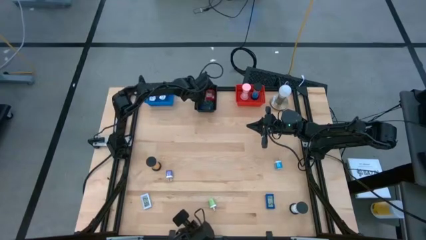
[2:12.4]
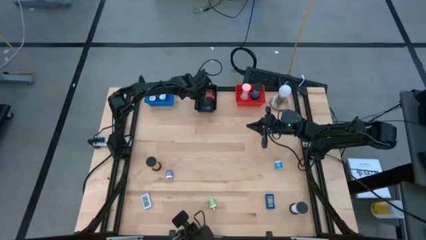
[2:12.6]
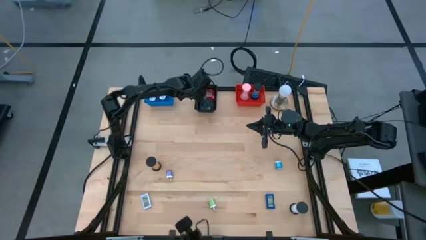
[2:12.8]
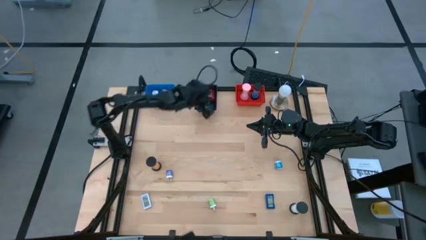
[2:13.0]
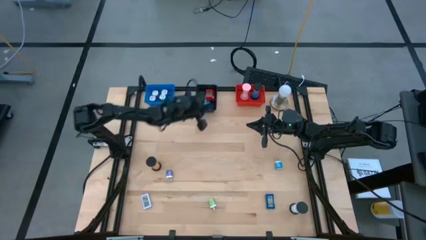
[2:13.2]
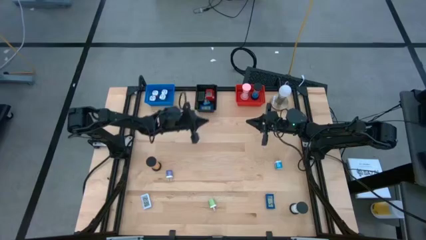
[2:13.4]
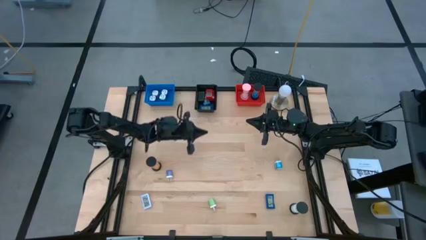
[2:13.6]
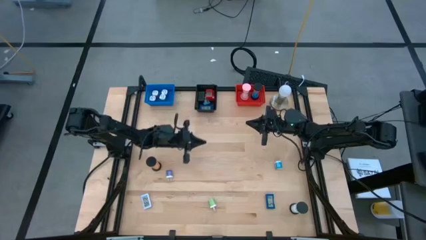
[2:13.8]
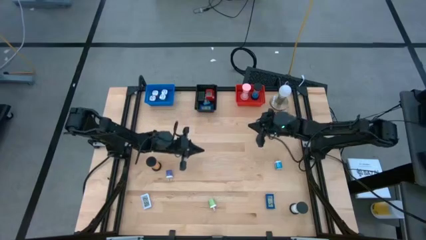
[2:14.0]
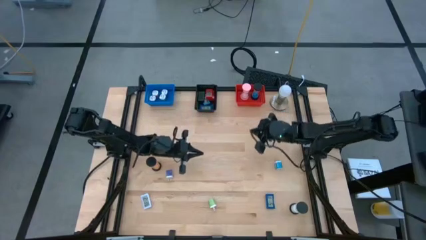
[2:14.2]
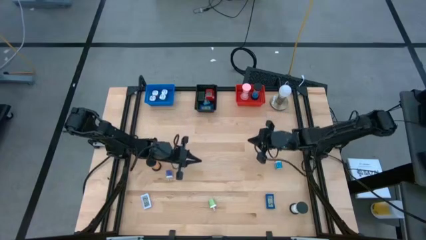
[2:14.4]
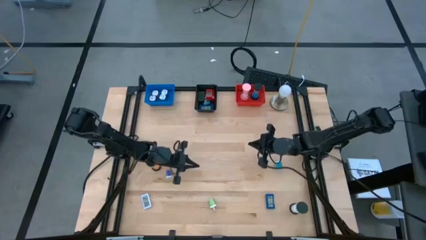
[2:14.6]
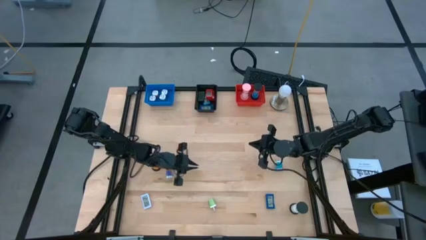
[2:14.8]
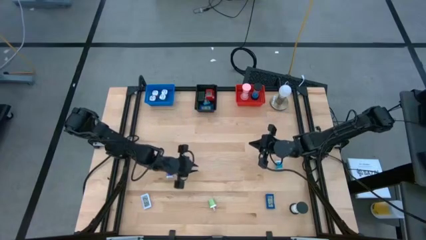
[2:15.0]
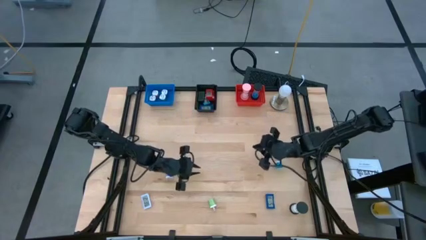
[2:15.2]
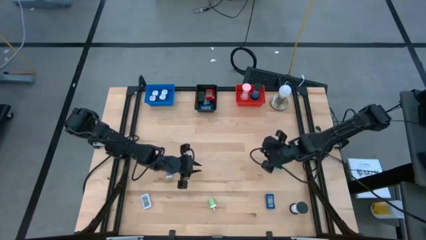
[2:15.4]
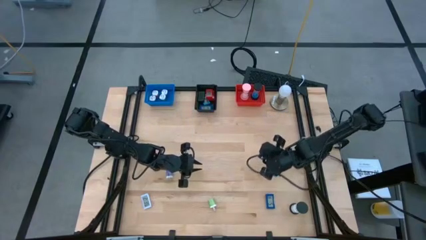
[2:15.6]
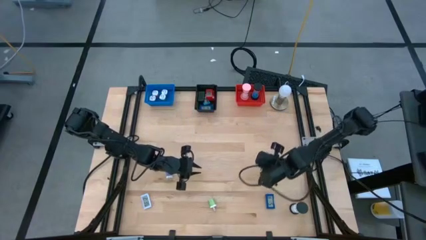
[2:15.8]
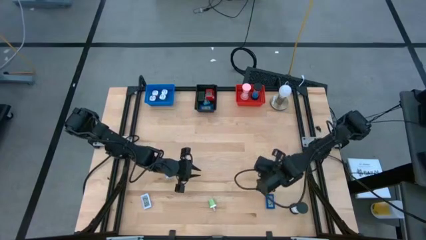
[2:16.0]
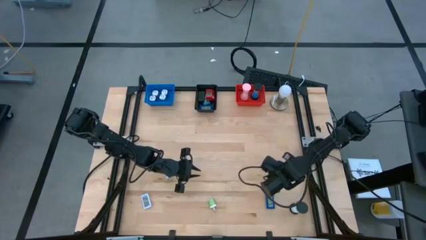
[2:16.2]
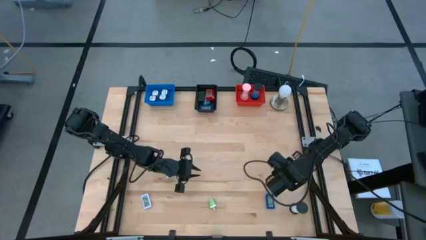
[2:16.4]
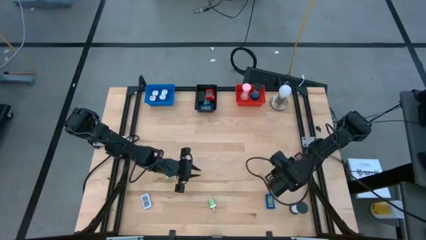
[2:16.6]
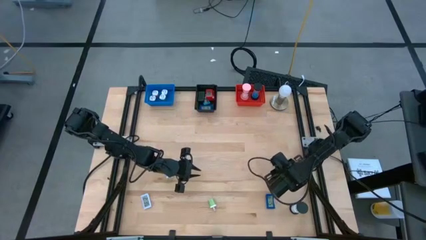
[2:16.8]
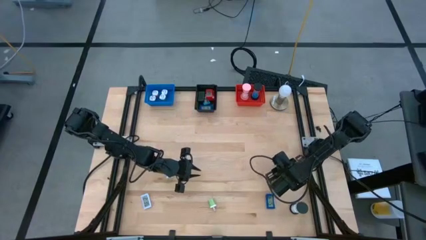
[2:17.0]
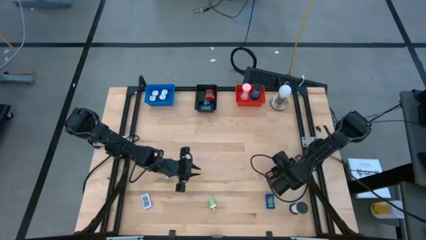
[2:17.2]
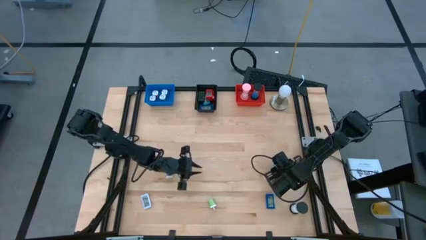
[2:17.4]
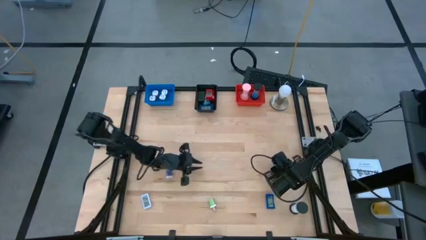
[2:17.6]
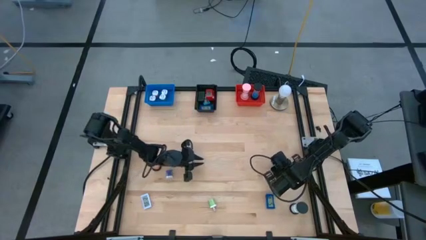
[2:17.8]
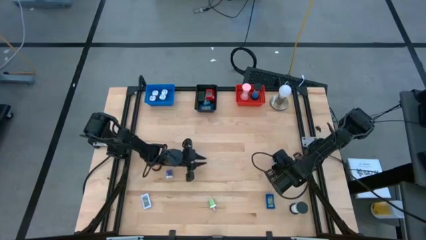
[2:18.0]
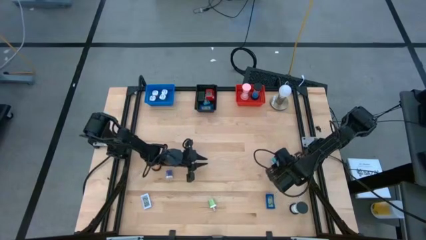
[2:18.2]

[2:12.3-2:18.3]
Task: Pick & Place Office items
Put the light blue charger adapter into the blue bin

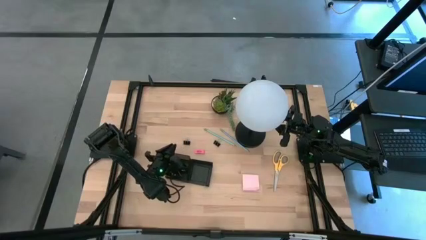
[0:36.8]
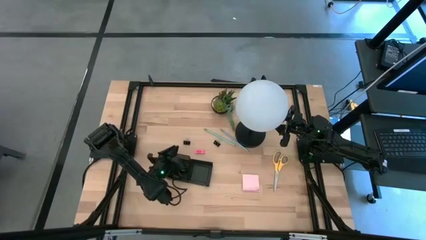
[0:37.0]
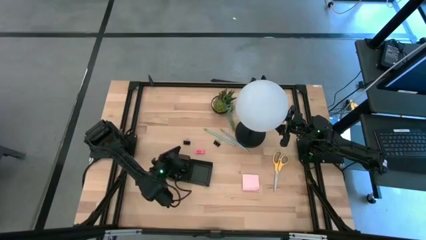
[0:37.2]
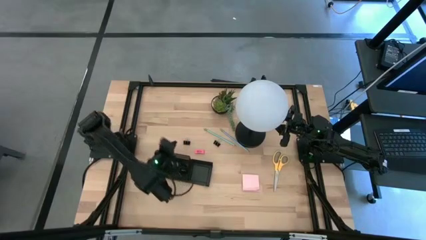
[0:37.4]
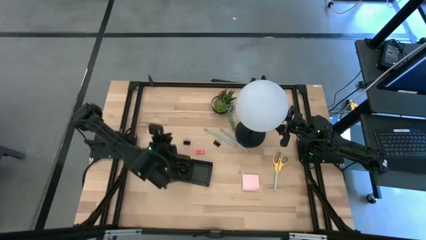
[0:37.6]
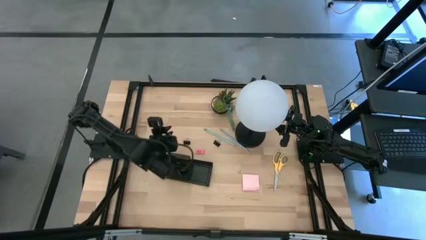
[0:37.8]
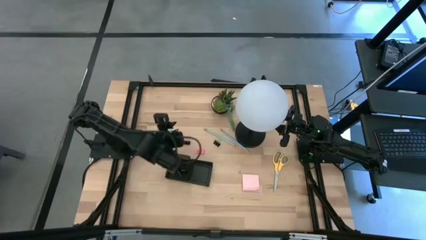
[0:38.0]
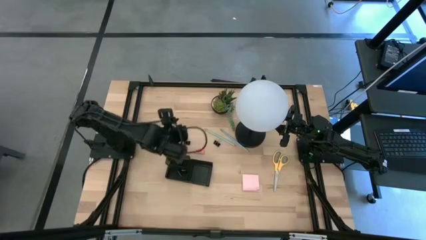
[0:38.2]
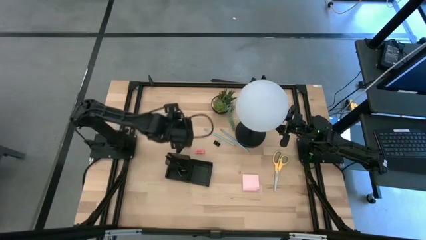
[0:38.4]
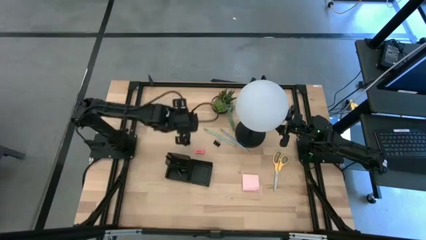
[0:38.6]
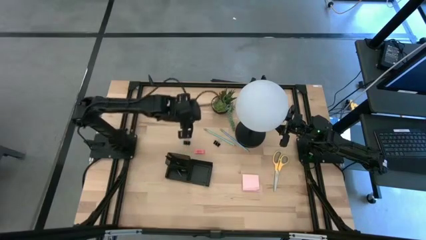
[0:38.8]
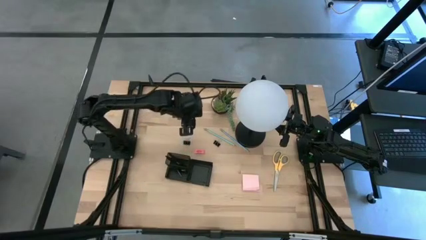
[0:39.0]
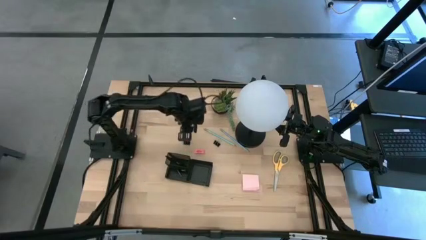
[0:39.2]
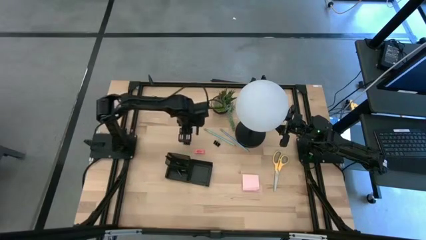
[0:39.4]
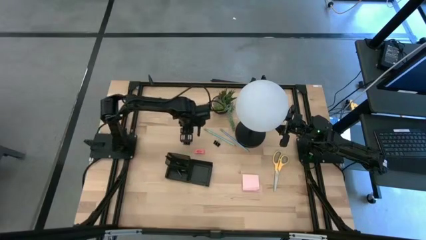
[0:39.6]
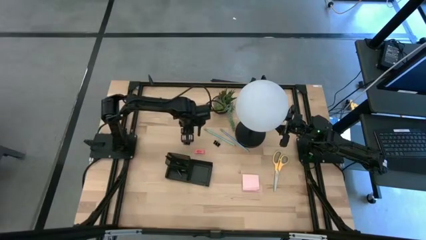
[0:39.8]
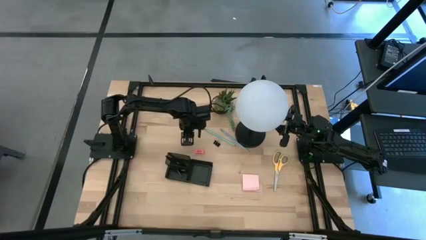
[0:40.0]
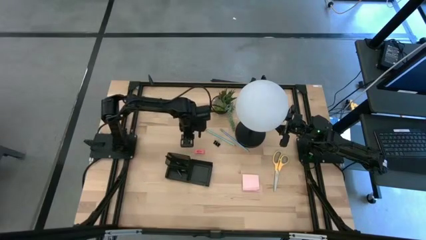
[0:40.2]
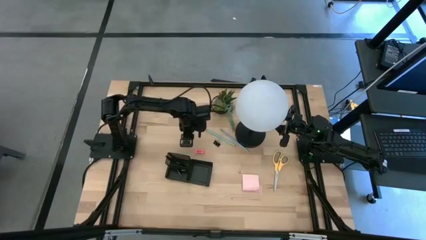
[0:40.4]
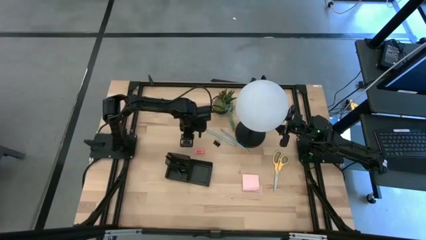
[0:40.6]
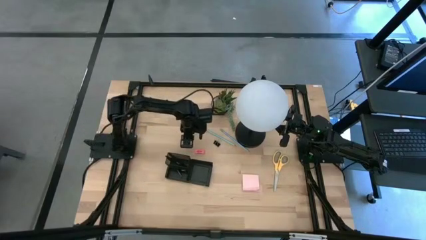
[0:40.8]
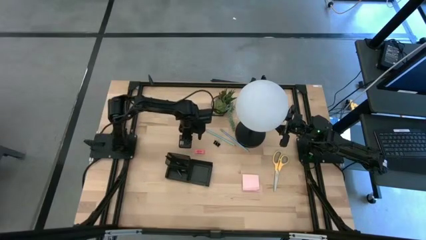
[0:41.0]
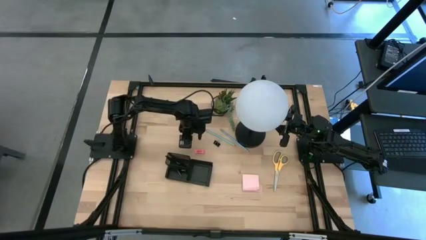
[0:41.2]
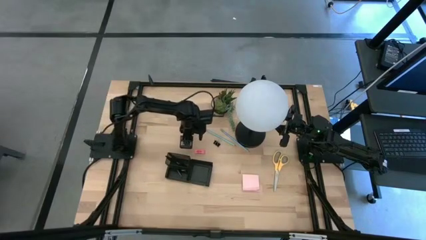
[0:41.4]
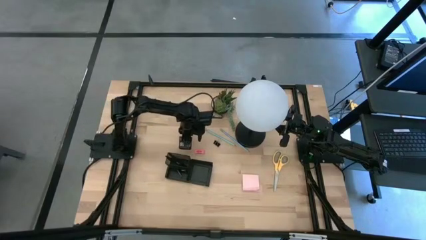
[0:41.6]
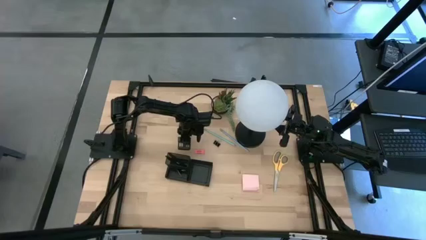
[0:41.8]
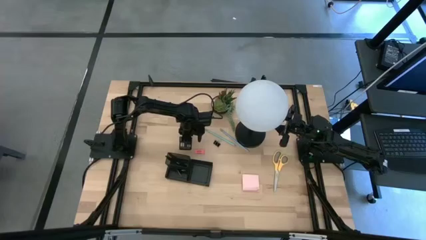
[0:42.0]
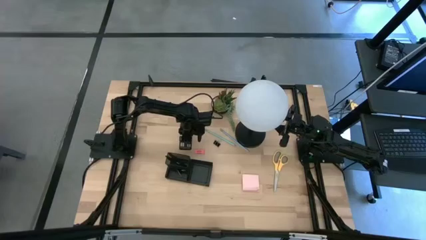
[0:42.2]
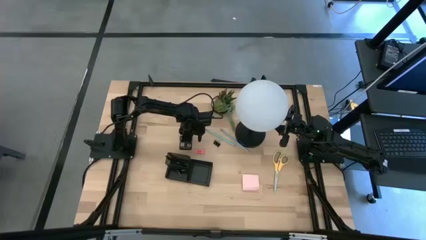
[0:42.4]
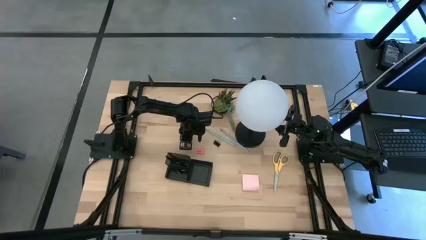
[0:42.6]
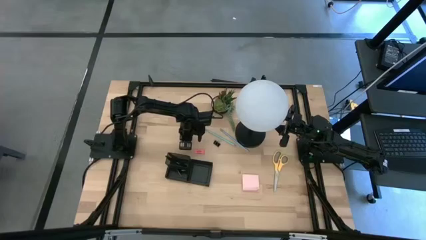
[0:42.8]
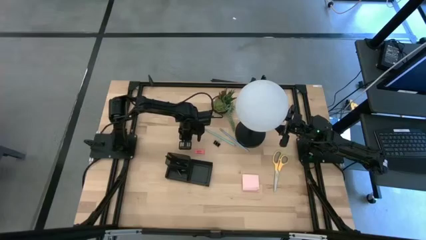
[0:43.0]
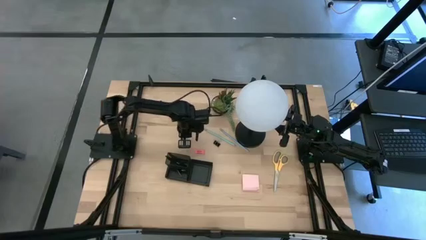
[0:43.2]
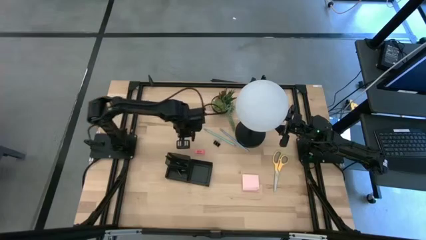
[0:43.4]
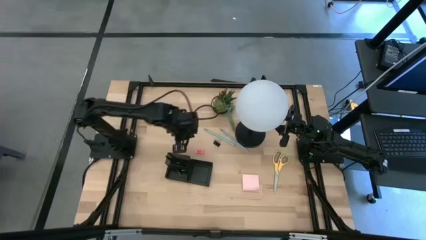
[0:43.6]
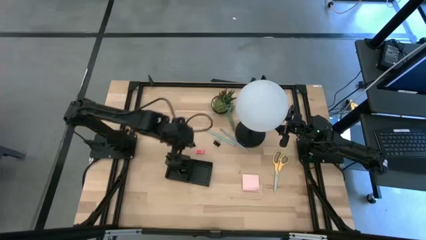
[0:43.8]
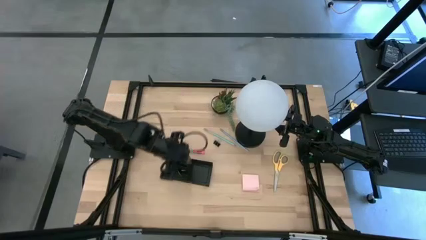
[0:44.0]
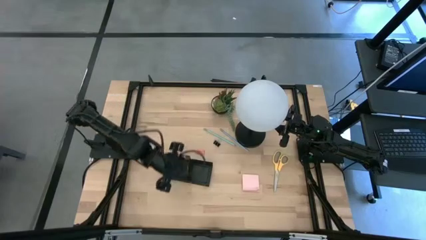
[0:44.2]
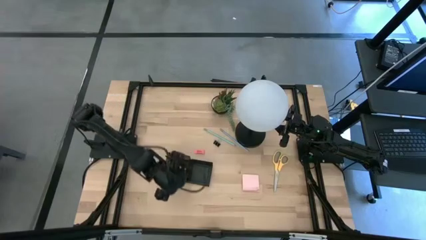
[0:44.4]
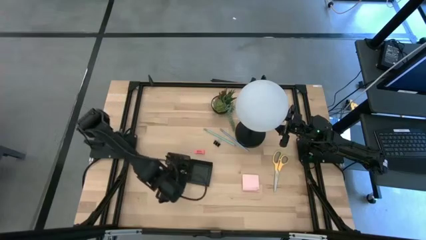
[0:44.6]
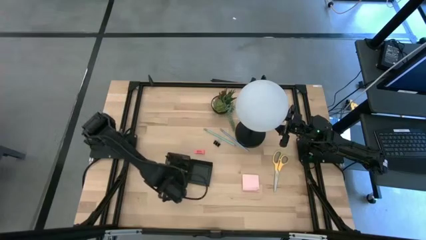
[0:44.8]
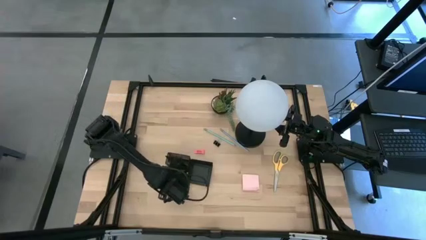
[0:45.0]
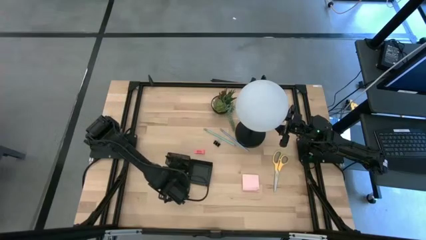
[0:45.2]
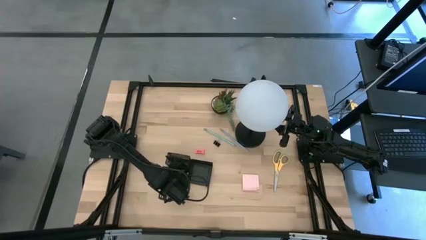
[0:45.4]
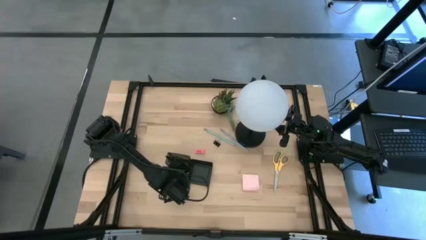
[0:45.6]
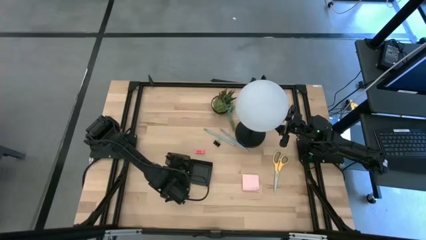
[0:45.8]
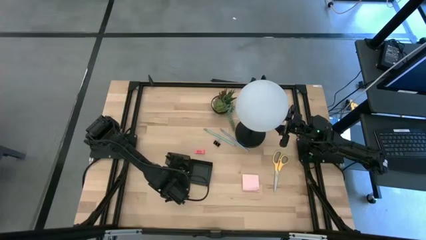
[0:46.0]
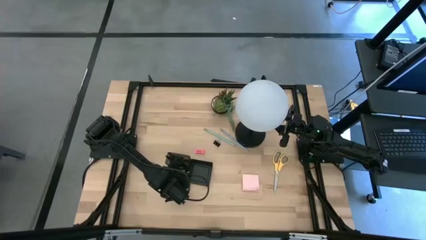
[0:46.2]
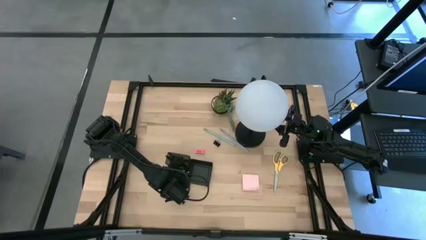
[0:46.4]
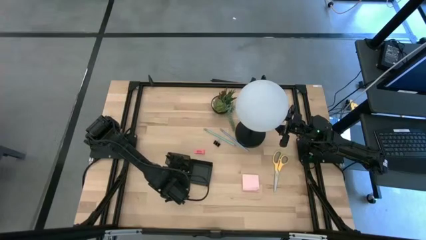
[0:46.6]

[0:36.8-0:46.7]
Task: Pick and place office supplies into organizer
Put the left black binder clip into the desk organizer
